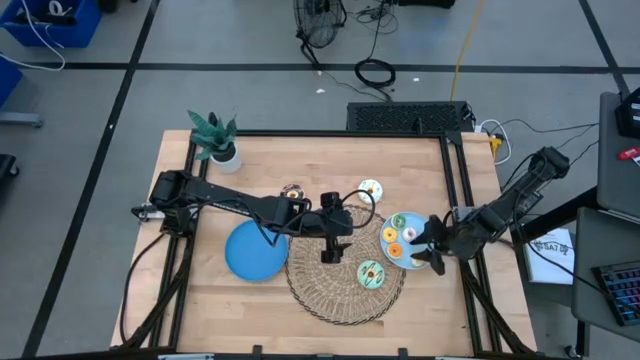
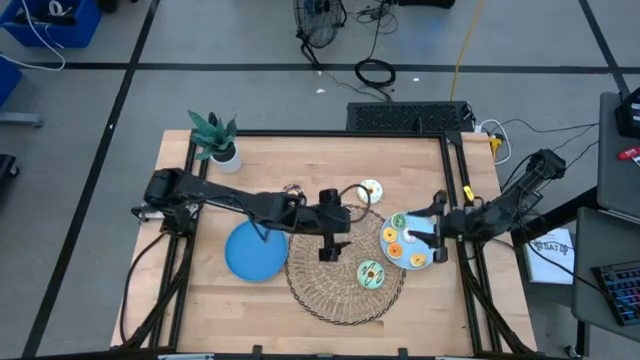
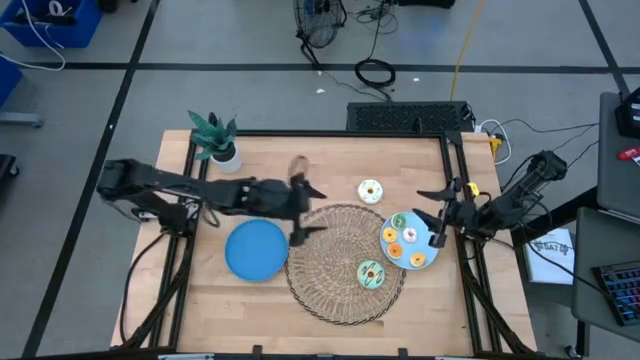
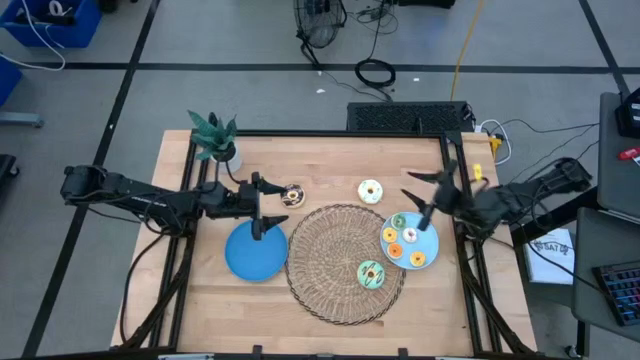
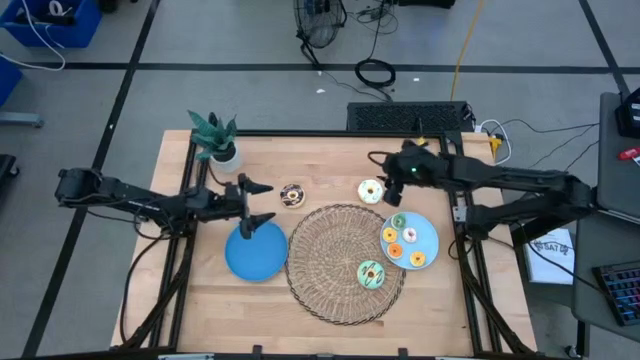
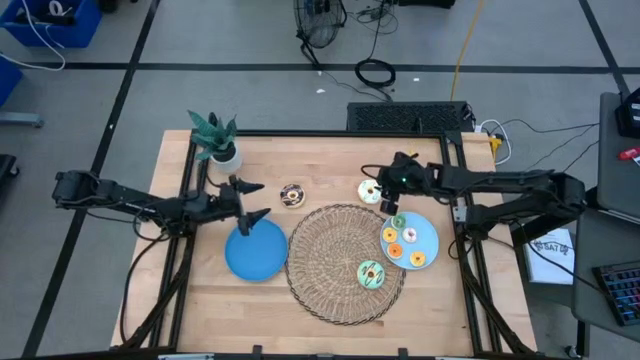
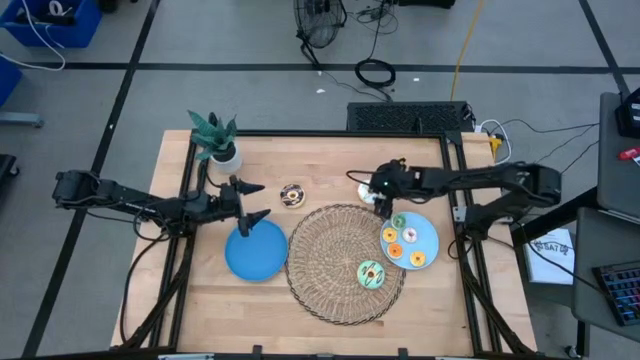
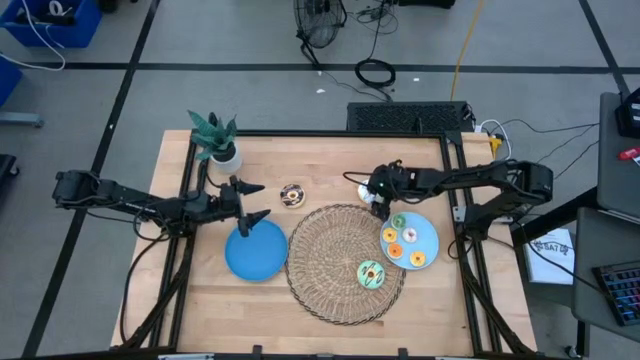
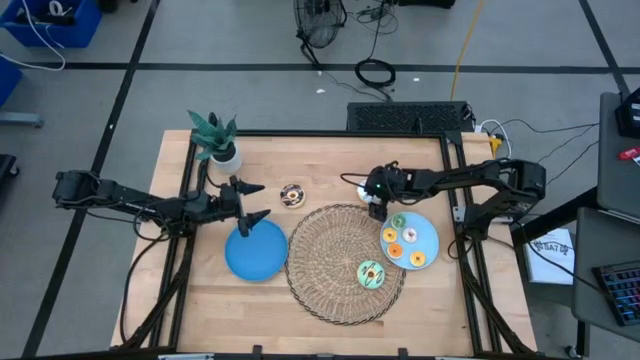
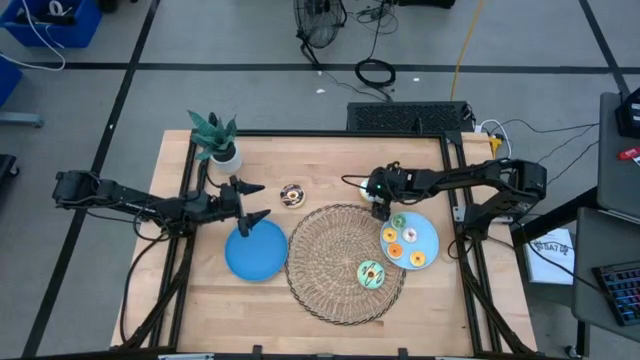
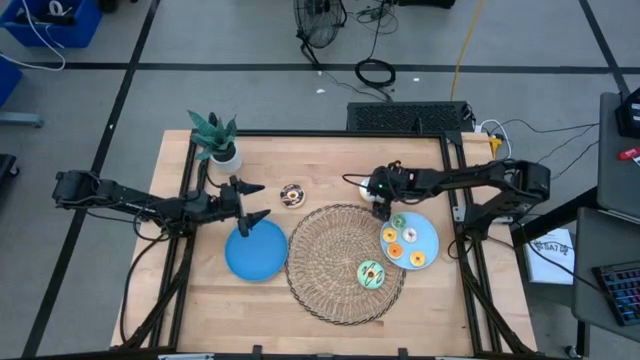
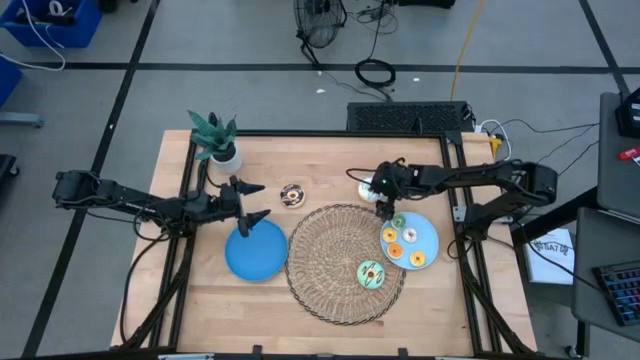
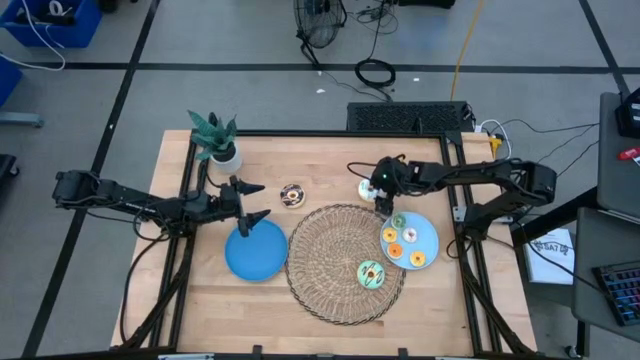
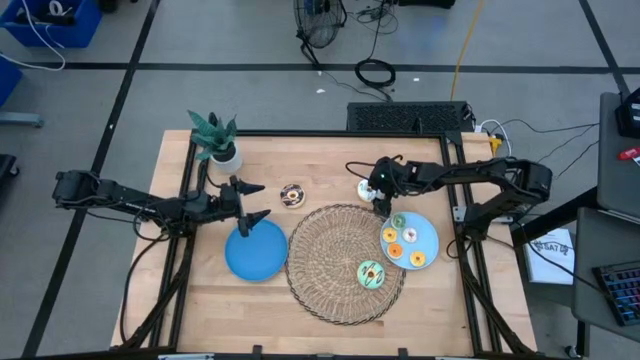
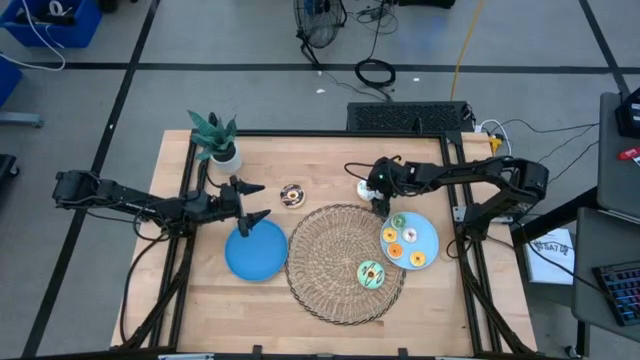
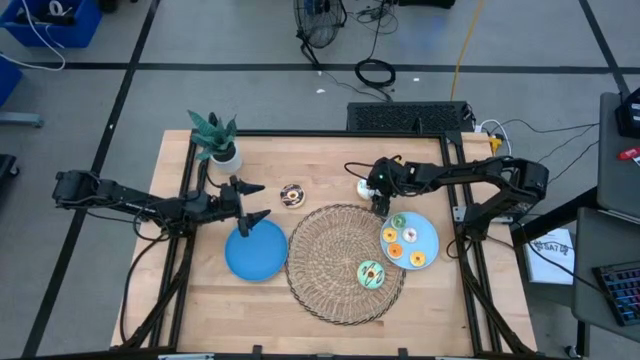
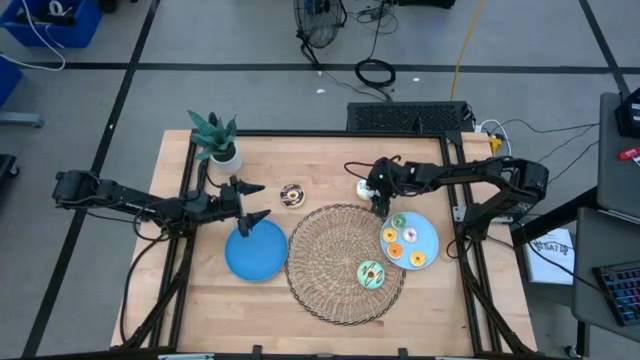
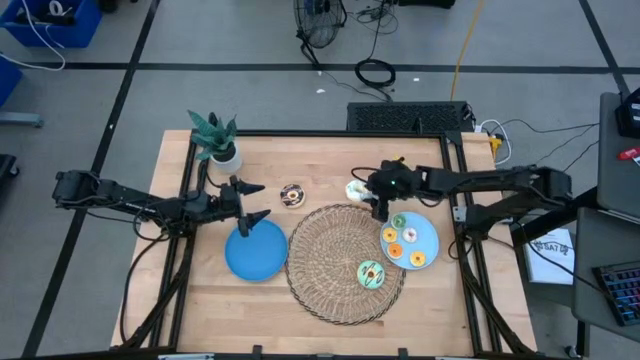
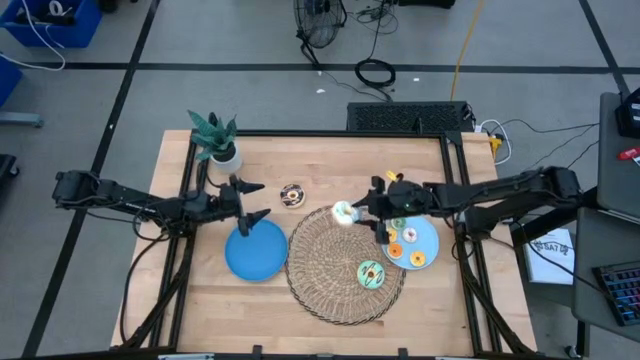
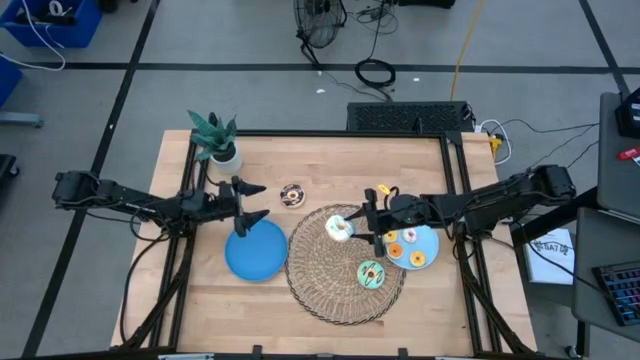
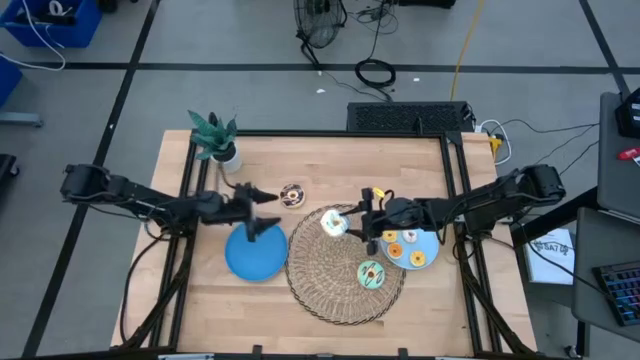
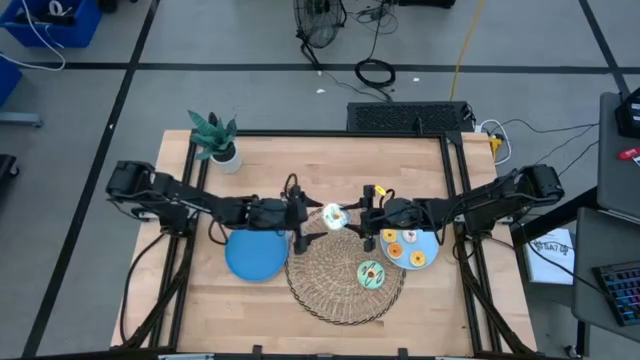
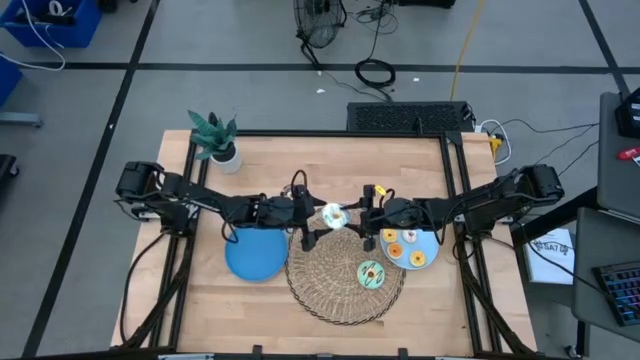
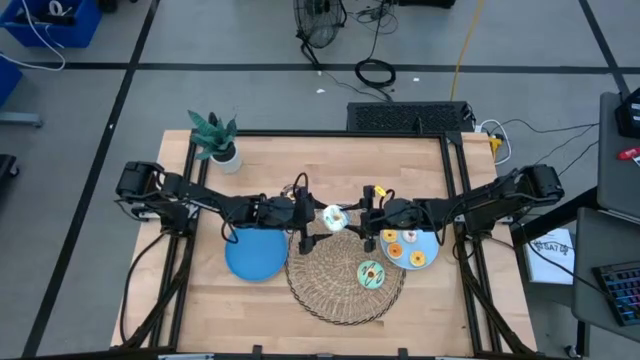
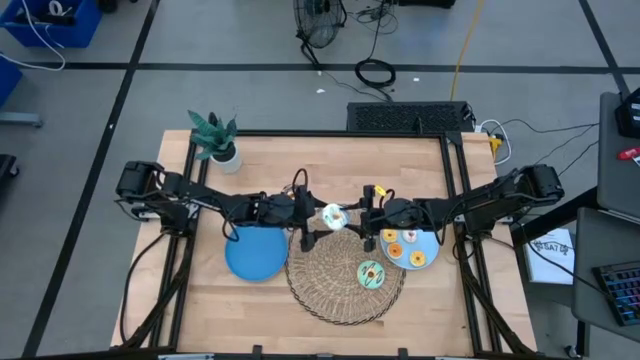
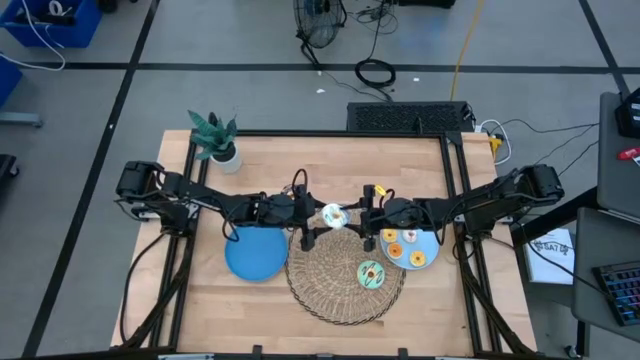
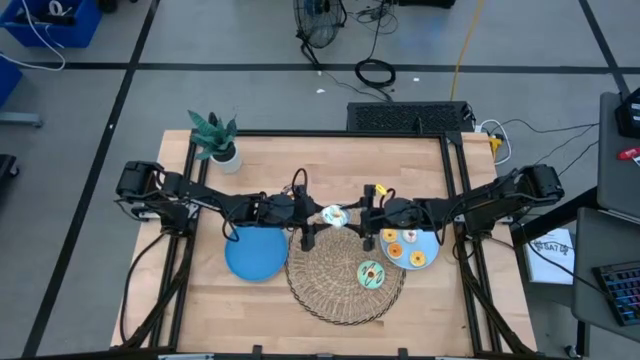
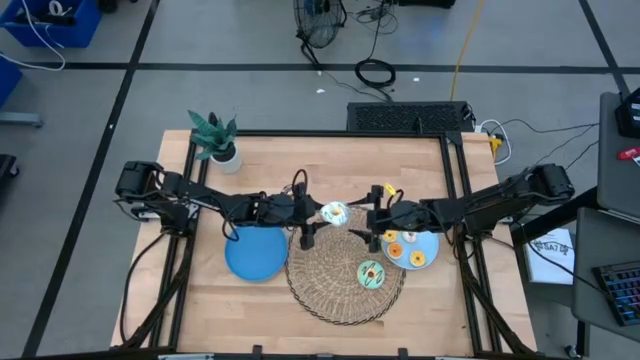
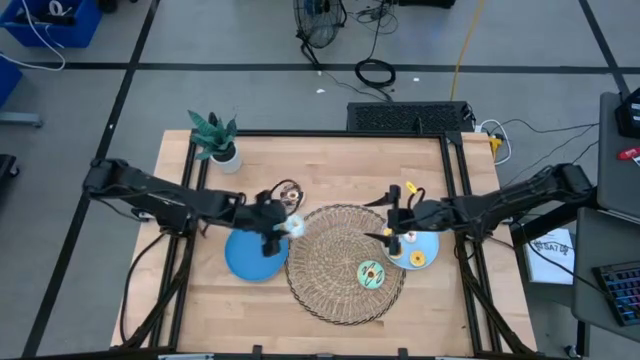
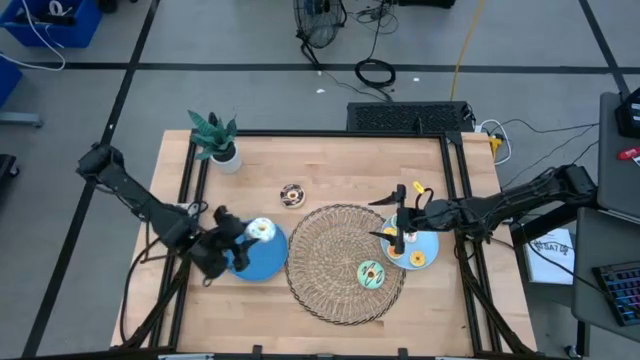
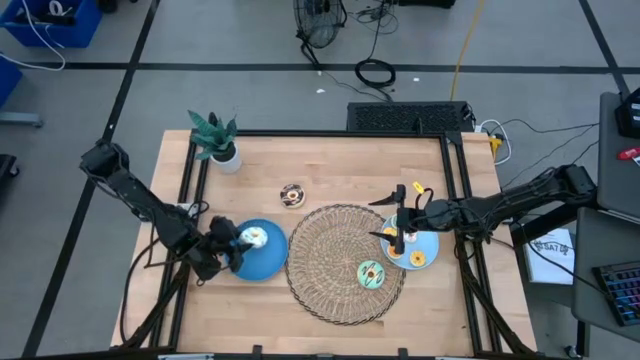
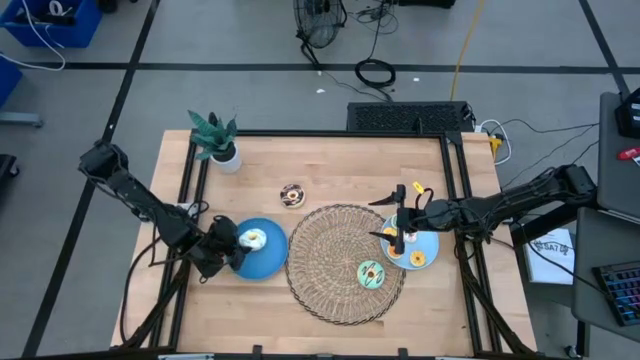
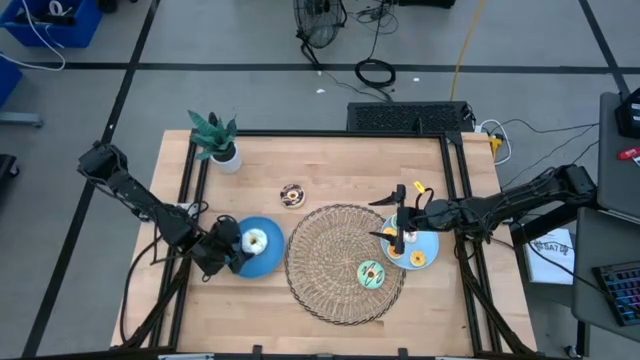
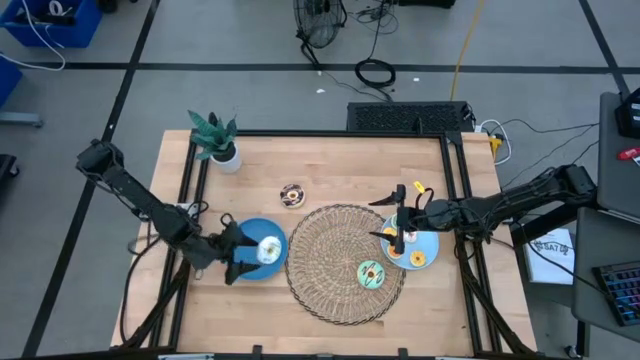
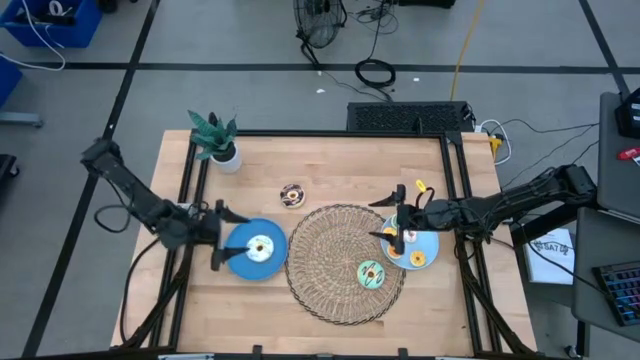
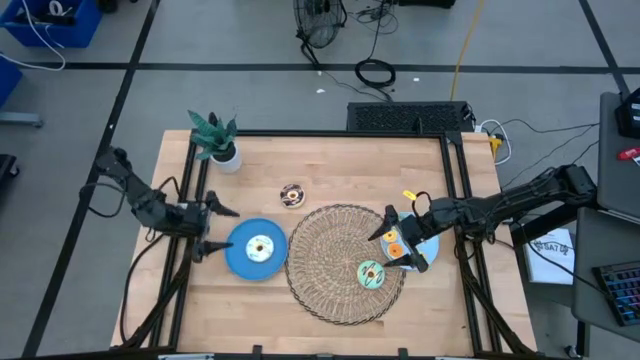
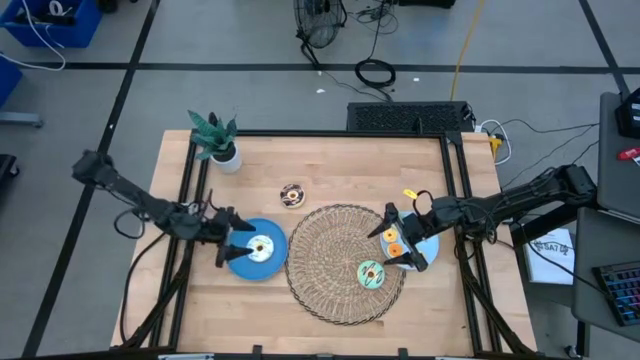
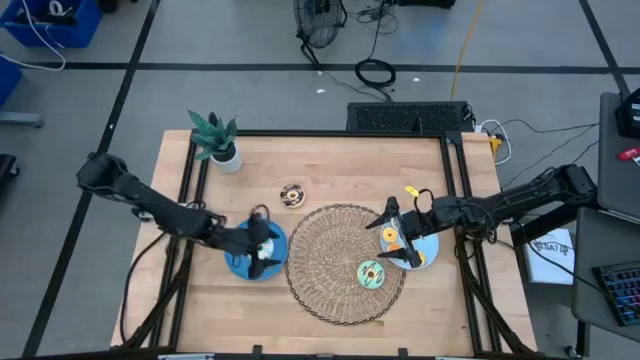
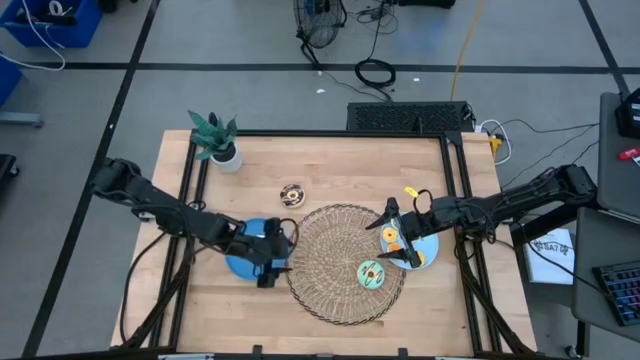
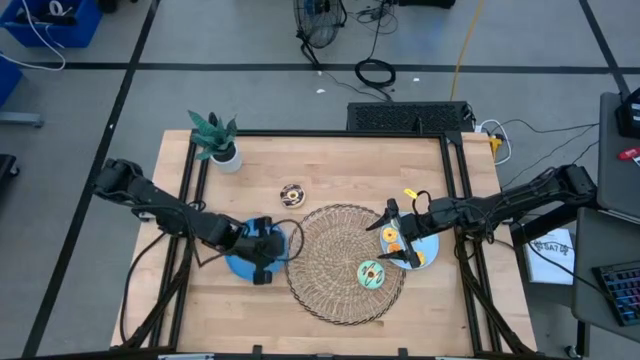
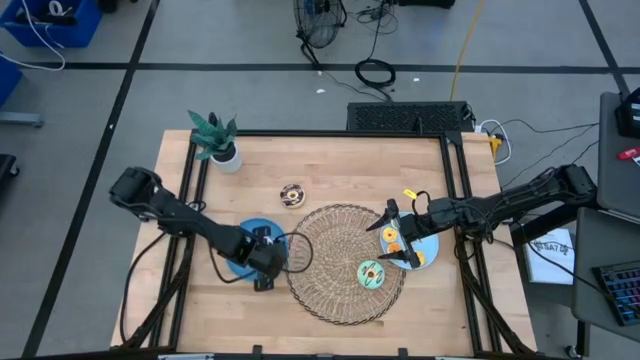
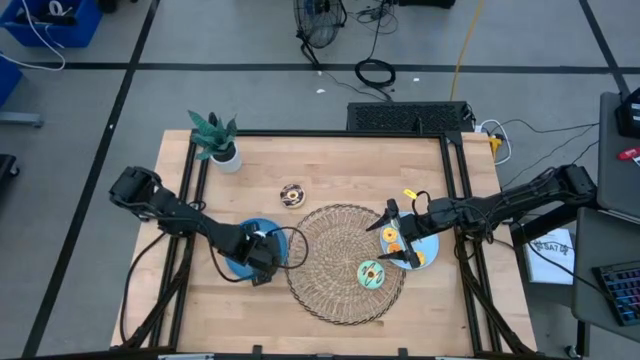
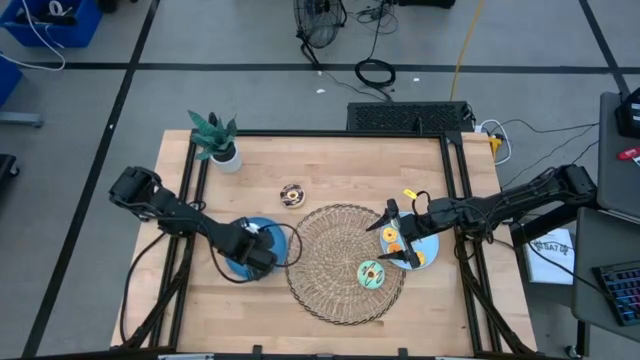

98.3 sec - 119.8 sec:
Task: Pick & Place donuts
Put the large white donut on the blue plate
